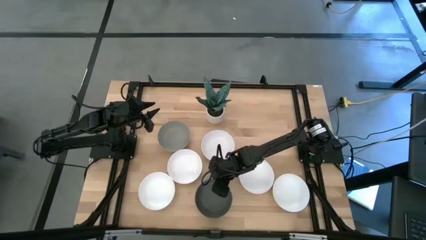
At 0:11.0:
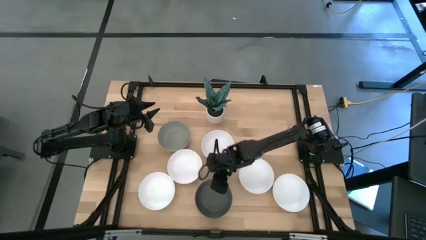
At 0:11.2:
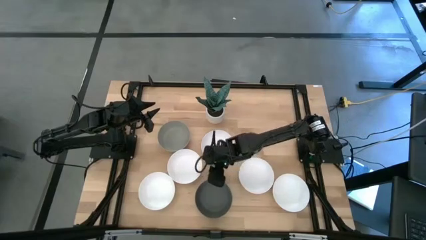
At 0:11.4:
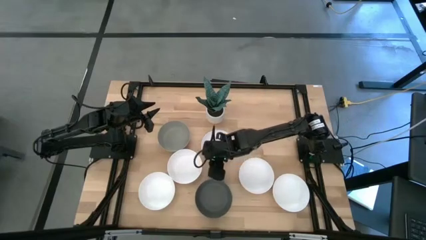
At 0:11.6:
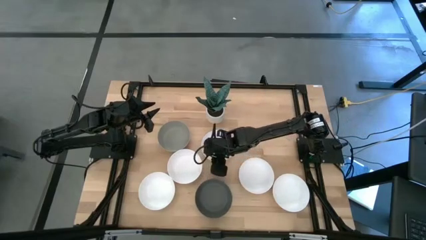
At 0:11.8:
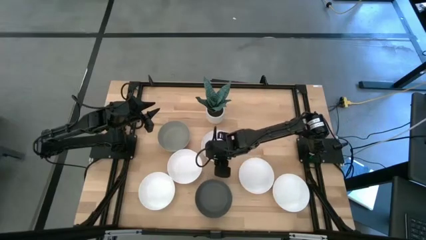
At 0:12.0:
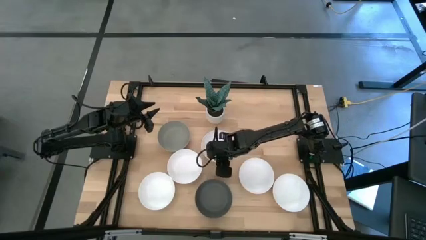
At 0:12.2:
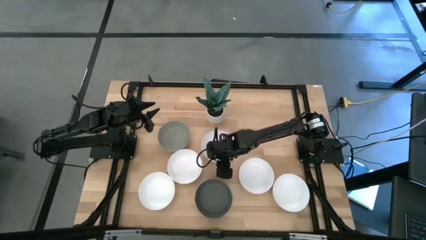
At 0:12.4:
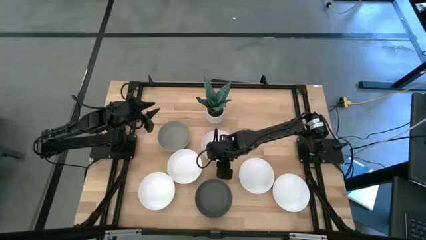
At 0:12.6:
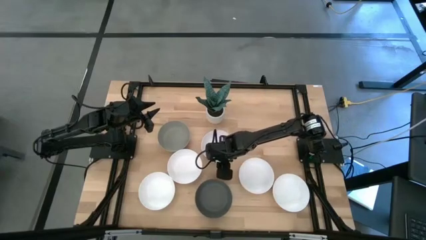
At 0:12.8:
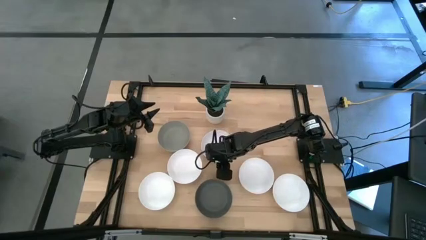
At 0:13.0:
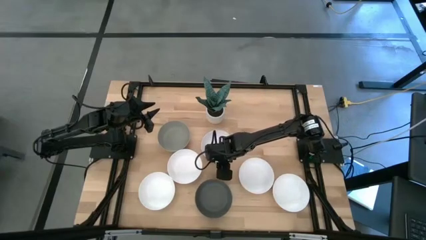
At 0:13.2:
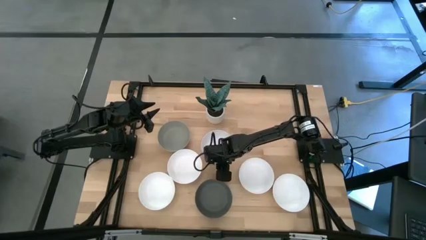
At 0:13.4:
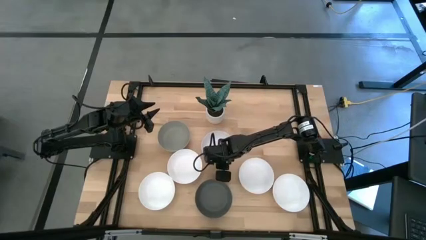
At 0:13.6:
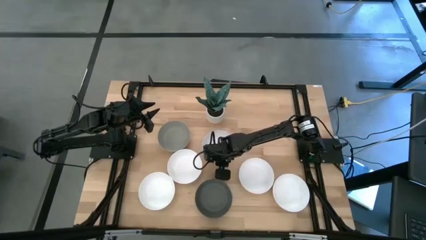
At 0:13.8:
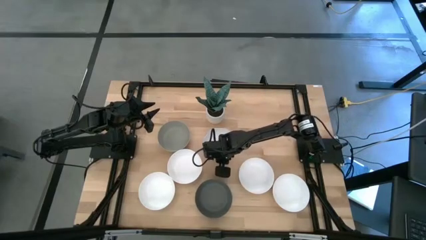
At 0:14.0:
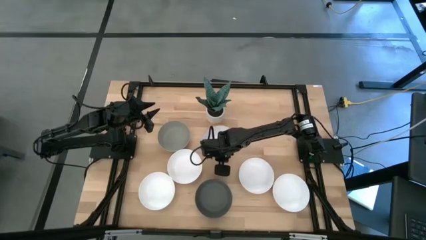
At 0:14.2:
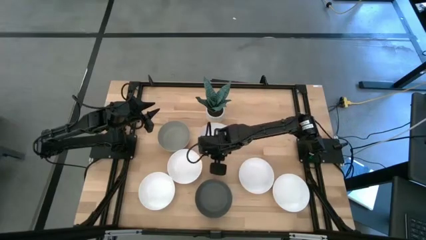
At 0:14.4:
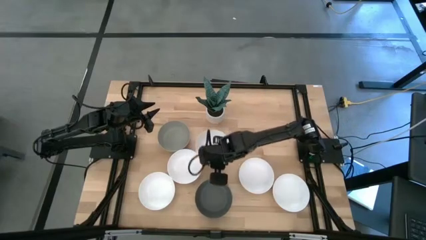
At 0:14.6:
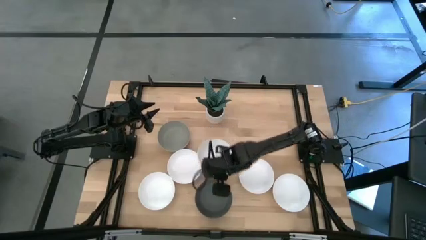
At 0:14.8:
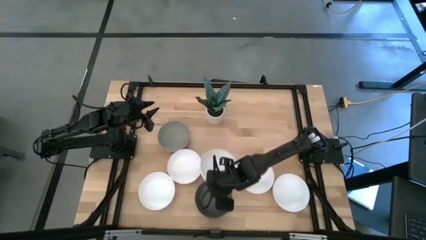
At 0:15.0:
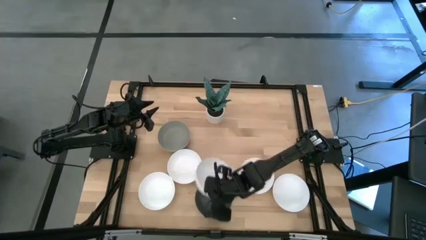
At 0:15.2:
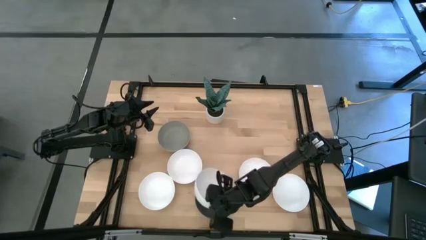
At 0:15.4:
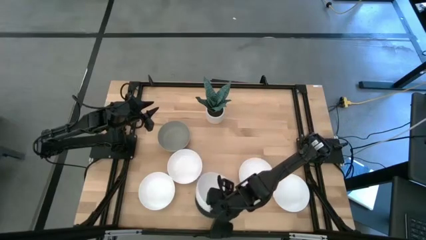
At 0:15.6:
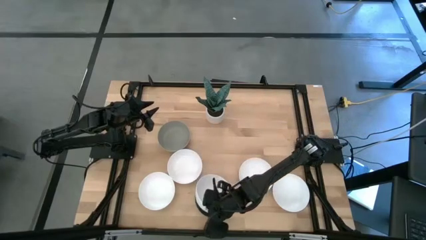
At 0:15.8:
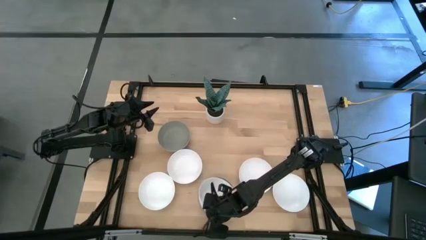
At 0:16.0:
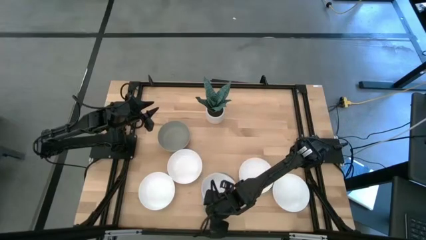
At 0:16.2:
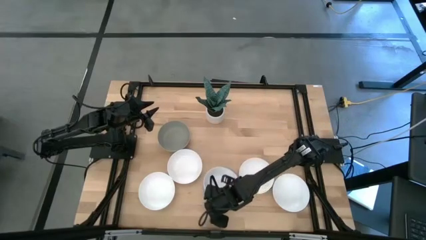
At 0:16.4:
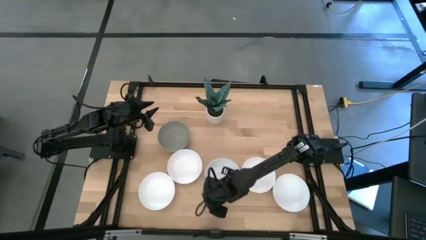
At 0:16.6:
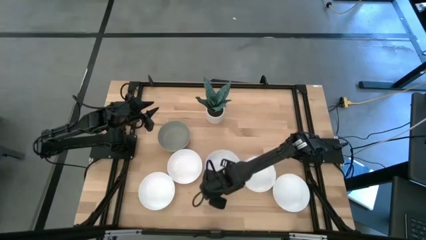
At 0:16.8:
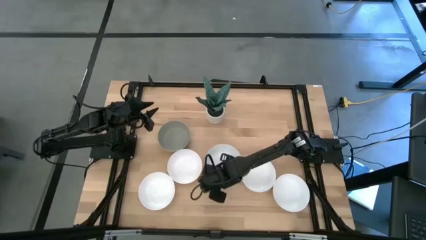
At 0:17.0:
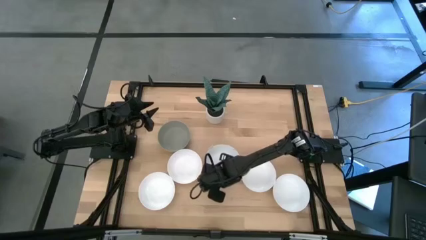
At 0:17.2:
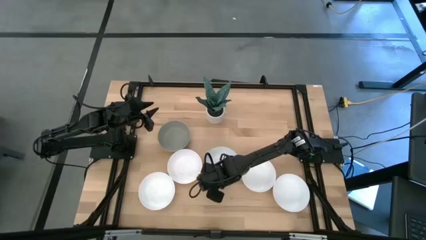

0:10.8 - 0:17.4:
Task: Nest bowls inside each other
Stack the white bowl on the dark gray bowl

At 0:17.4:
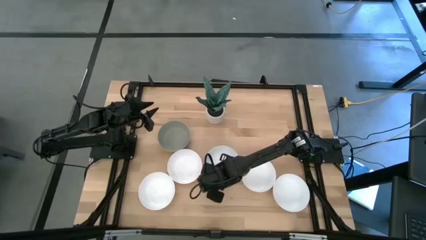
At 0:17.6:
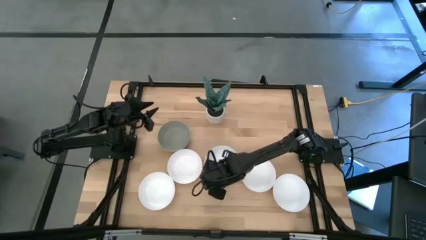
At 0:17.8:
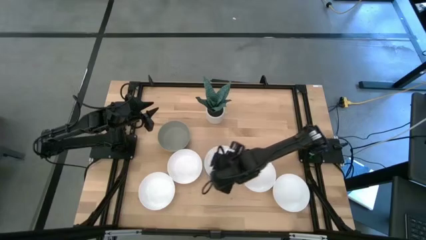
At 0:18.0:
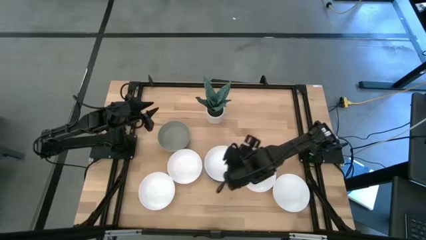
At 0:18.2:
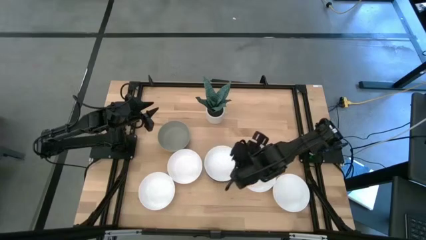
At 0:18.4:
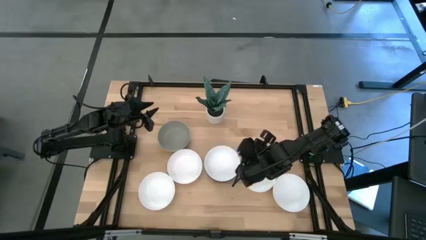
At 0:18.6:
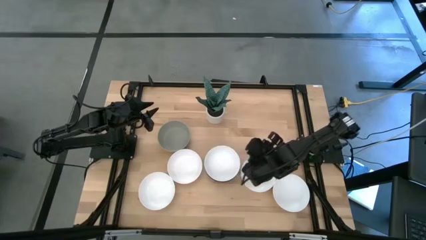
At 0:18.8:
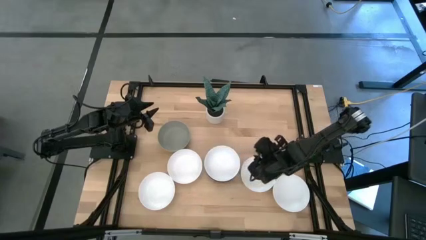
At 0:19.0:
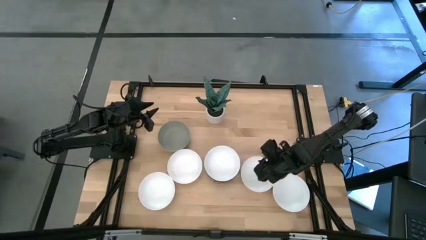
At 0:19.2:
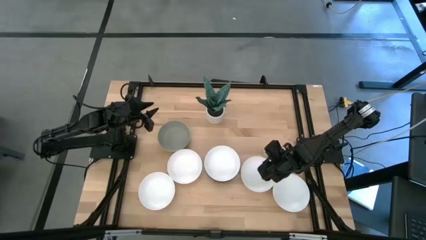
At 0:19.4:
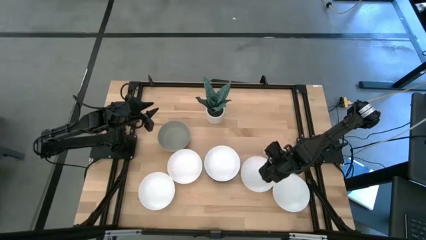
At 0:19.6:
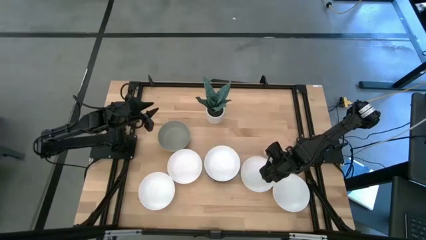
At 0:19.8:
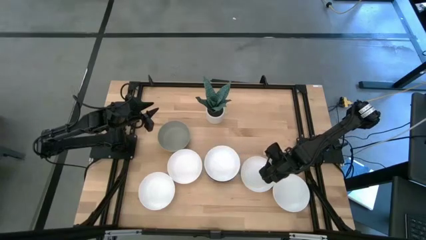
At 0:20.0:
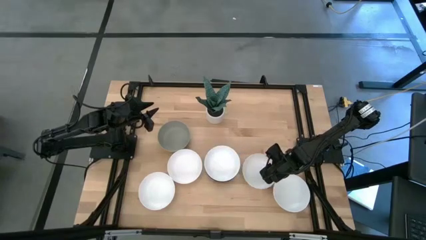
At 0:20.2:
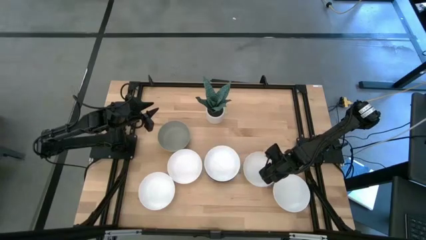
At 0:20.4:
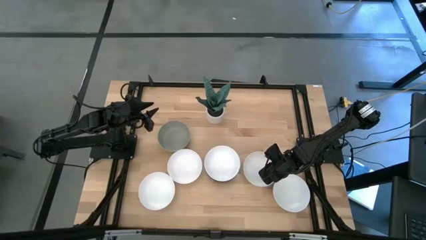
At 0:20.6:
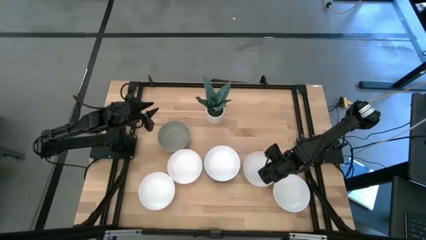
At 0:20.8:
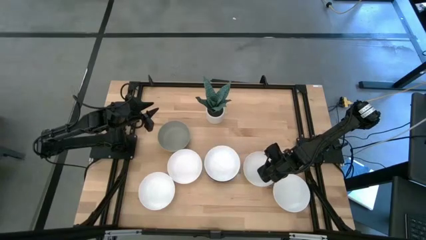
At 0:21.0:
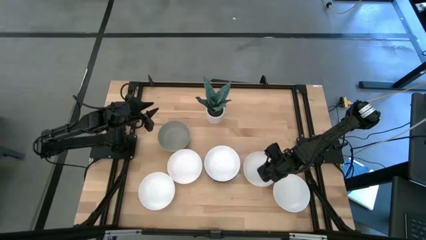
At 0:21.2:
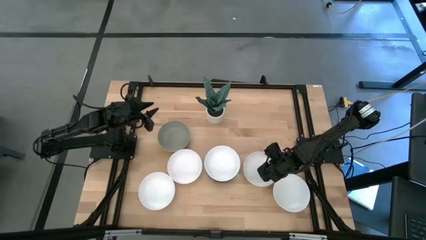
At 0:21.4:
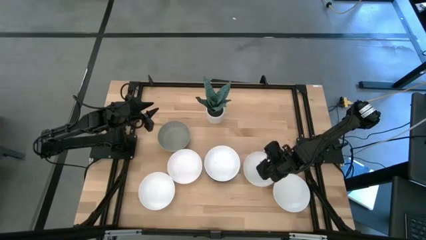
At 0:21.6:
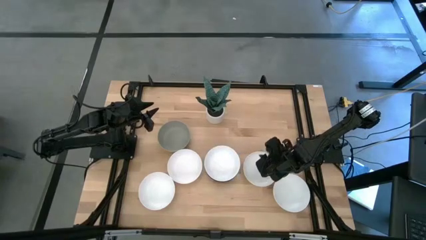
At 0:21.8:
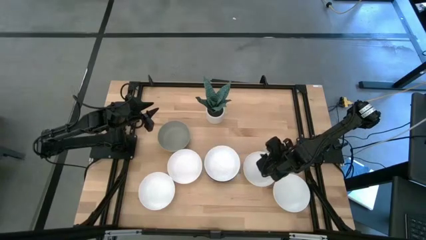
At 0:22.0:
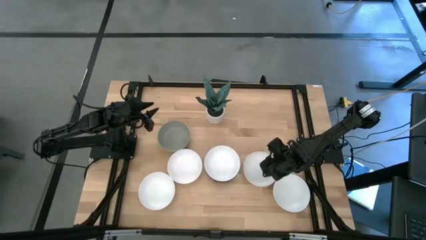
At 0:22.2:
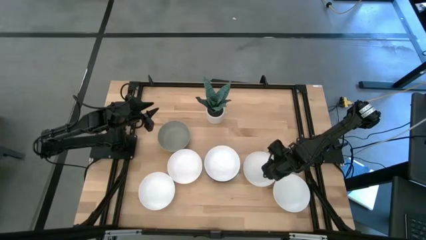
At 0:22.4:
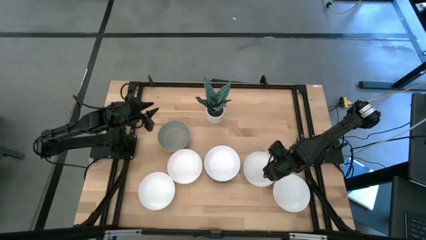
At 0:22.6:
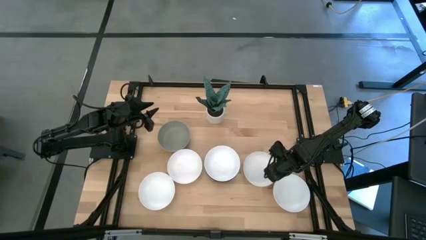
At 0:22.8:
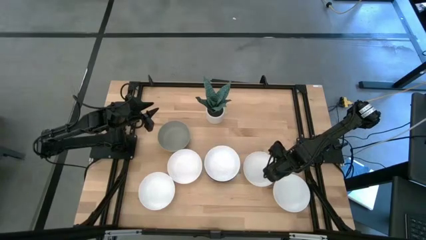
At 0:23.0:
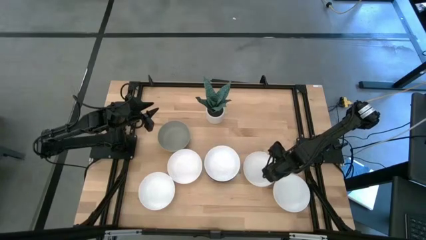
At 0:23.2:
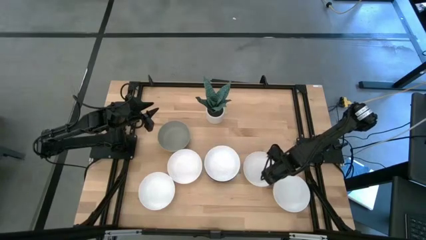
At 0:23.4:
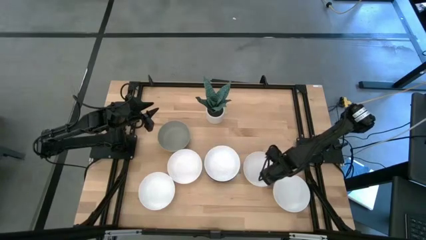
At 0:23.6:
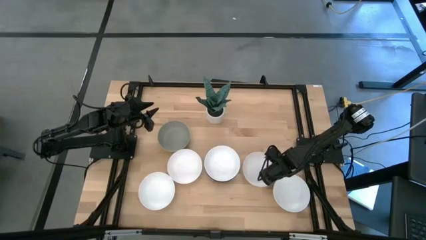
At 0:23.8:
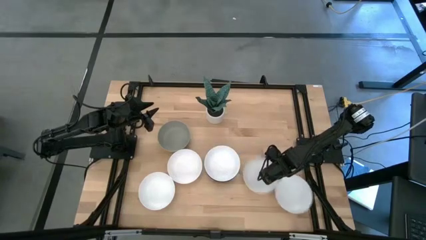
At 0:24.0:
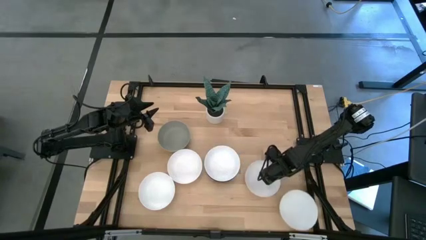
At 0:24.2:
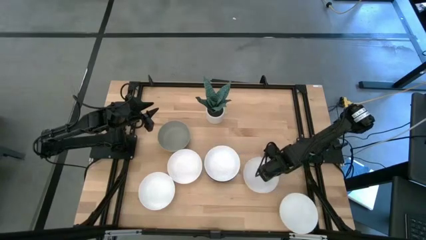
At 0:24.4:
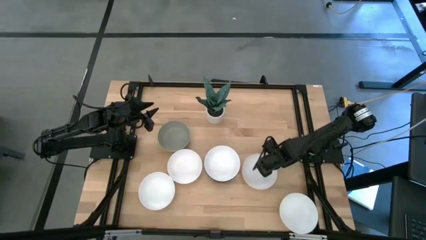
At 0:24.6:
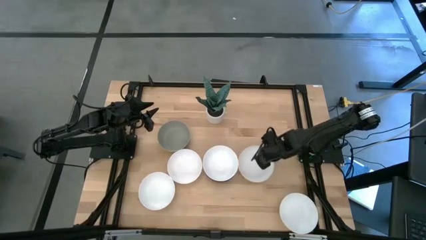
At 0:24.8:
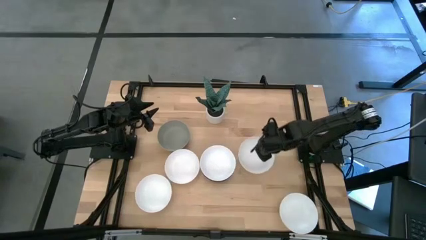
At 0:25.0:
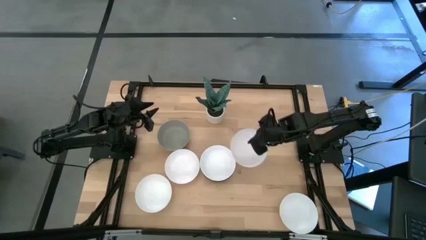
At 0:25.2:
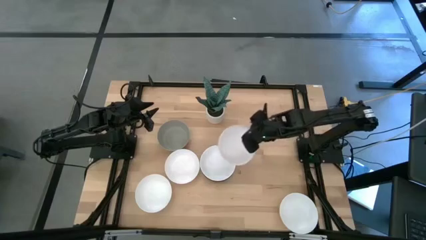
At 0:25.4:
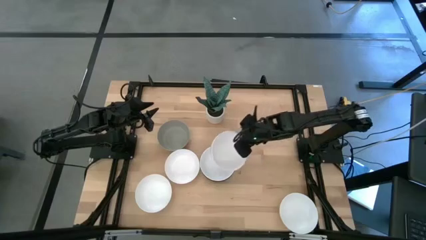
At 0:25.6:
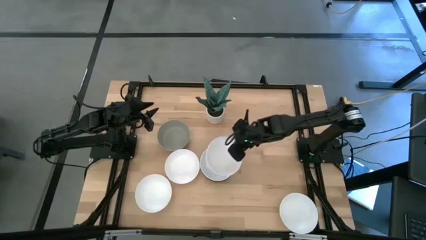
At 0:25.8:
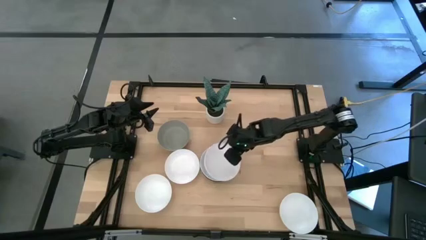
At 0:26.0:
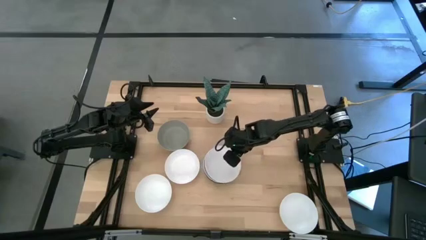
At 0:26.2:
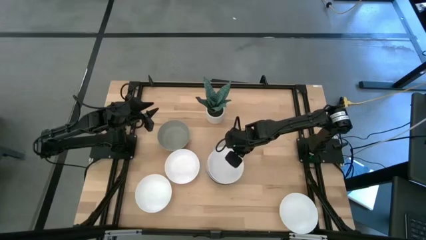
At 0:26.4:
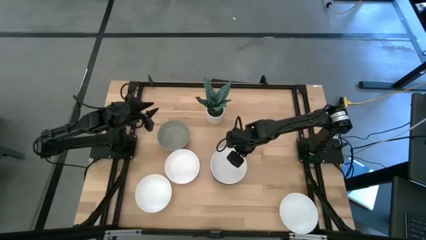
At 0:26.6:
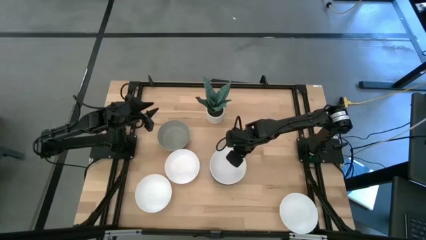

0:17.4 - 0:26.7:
Stack the white bowl on the white bowl

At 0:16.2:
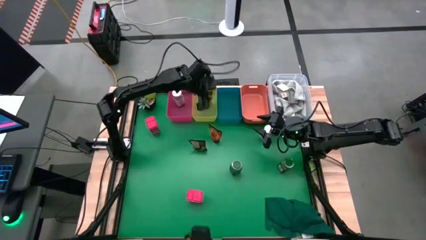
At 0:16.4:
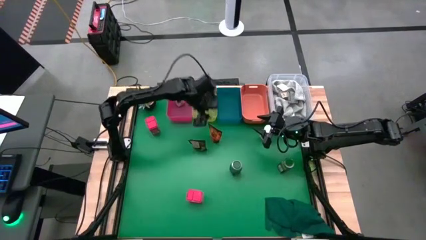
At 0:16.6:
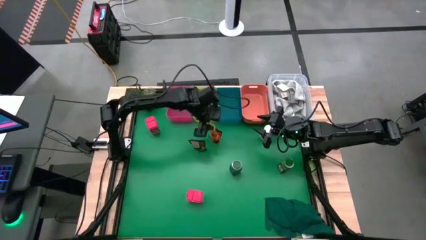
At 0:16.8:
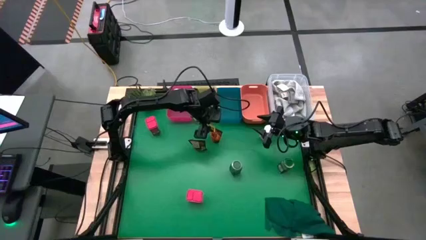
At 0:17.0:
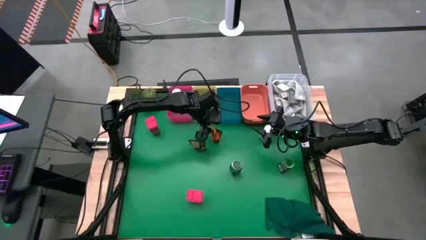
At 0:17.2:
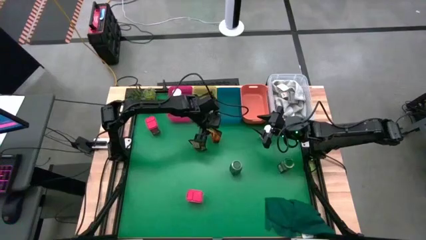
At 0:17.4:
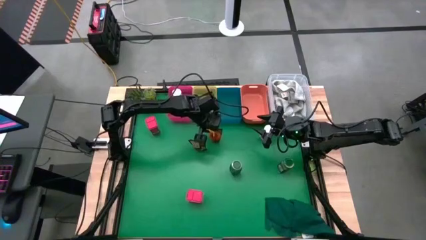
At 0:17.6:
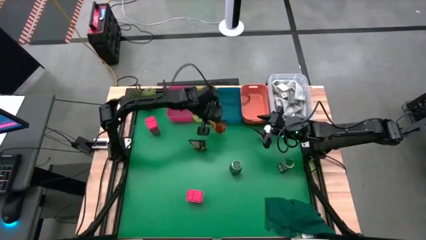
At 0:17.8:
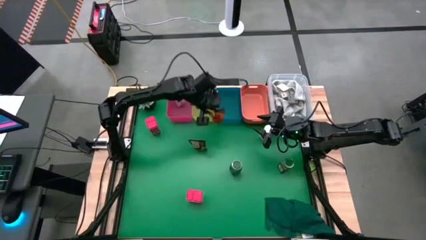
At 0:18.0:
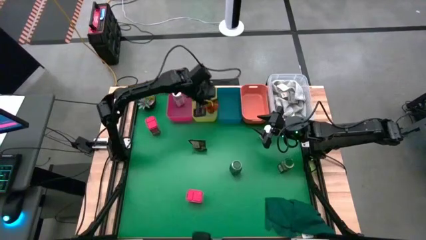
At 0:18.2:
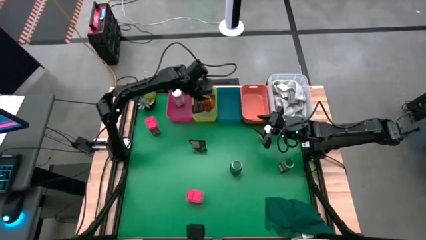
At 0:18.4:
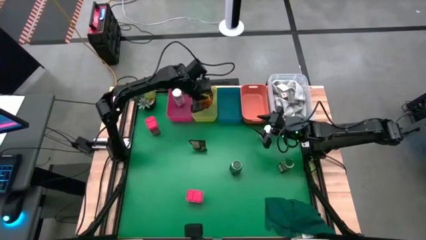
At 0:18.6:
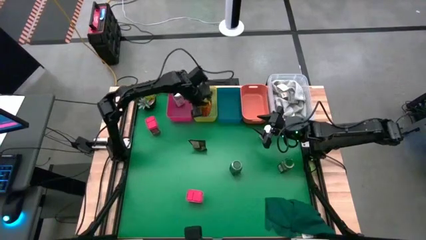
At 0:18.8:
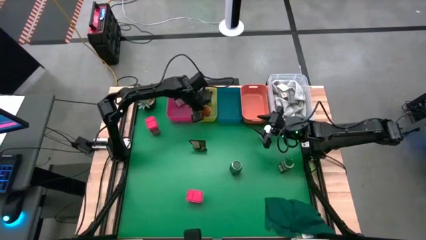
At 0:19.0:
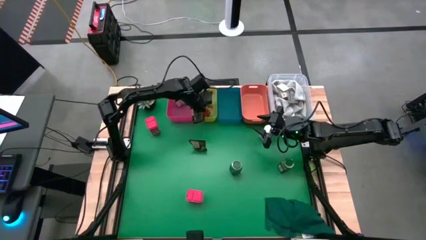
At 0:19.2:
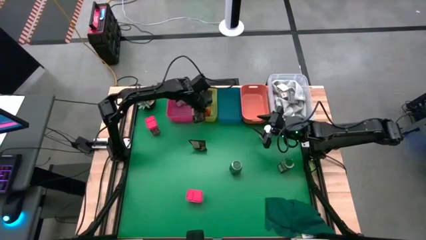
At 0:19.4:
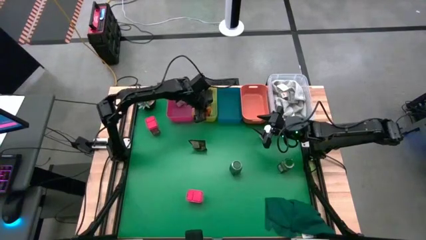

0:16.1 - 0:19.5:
Task: Sort spices by type
Put the top brown seasoning pack into the yellow bin
